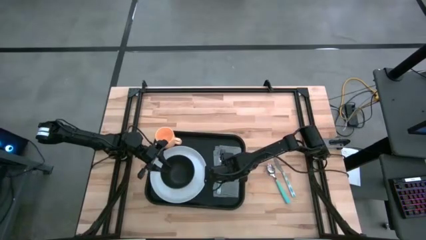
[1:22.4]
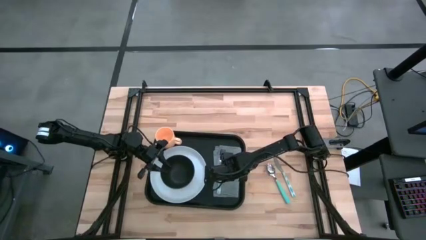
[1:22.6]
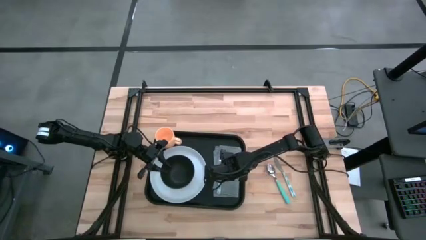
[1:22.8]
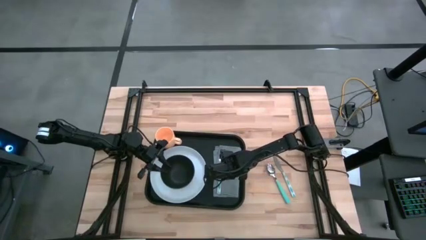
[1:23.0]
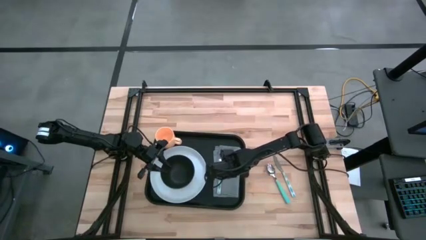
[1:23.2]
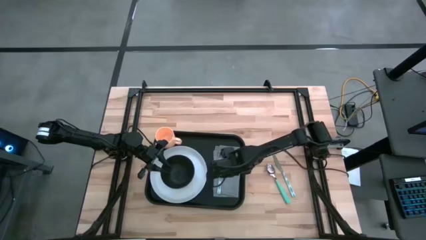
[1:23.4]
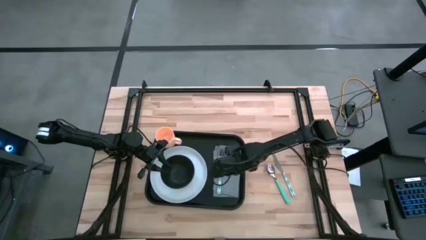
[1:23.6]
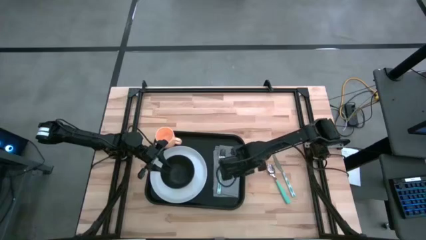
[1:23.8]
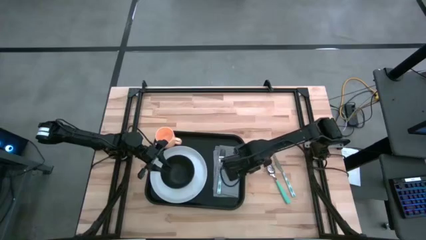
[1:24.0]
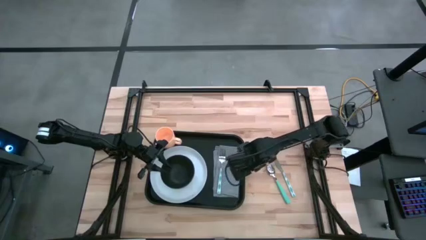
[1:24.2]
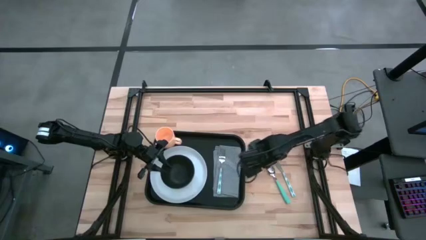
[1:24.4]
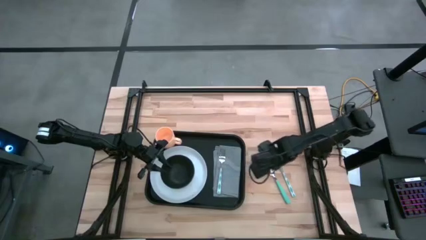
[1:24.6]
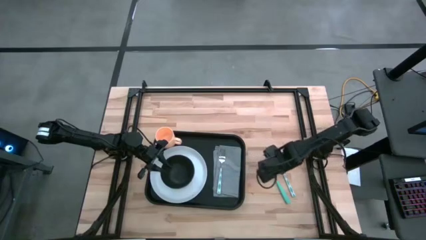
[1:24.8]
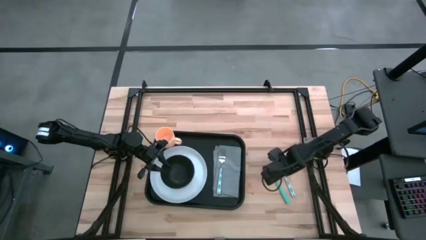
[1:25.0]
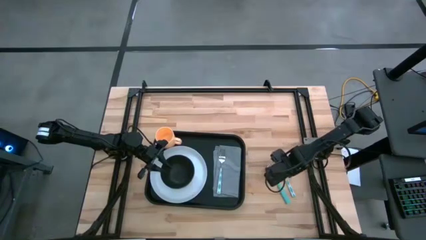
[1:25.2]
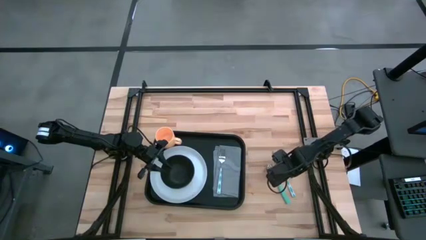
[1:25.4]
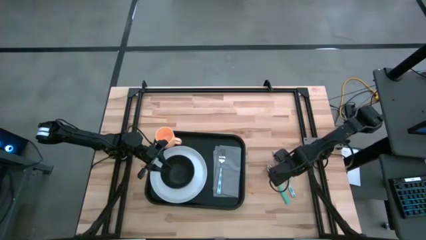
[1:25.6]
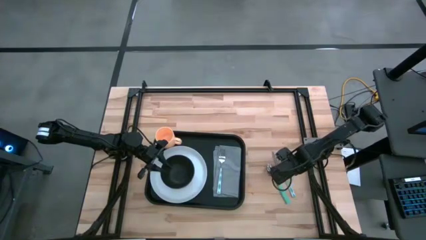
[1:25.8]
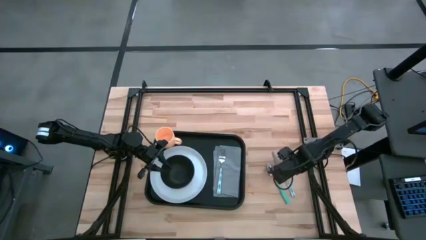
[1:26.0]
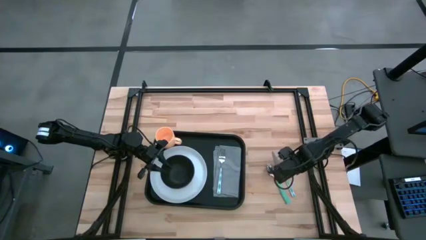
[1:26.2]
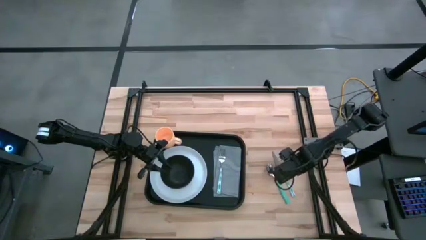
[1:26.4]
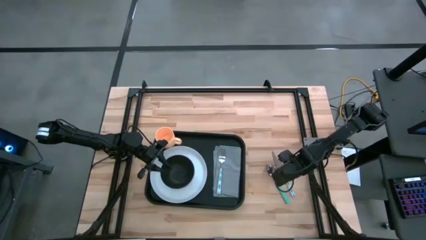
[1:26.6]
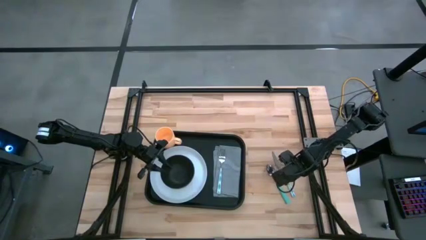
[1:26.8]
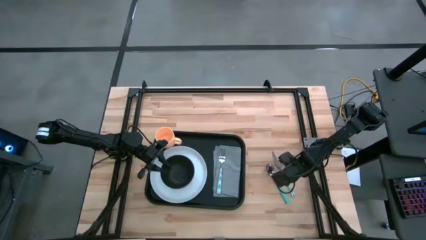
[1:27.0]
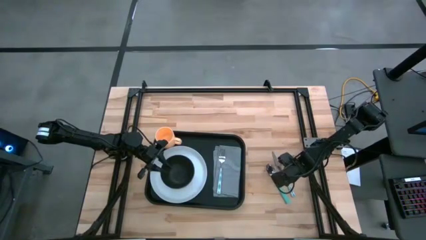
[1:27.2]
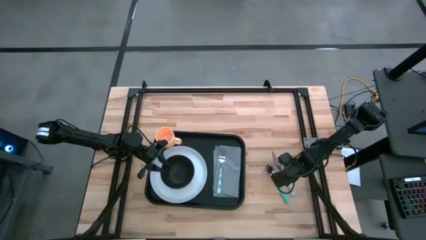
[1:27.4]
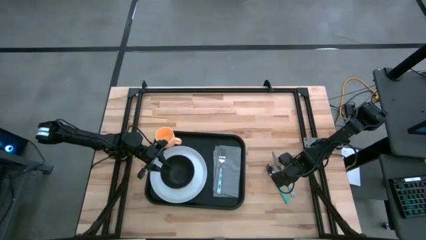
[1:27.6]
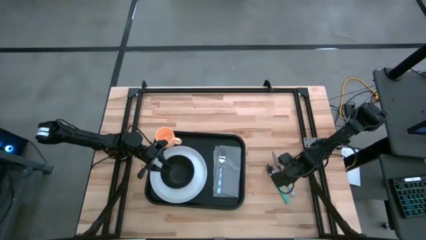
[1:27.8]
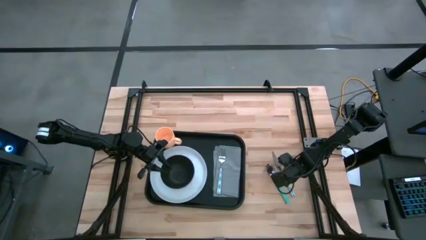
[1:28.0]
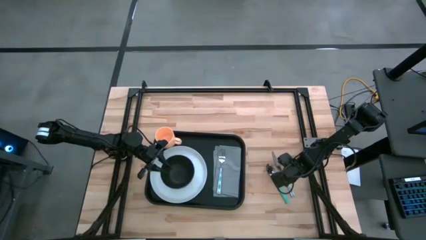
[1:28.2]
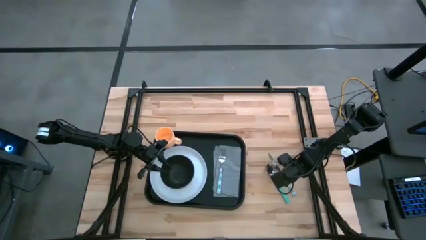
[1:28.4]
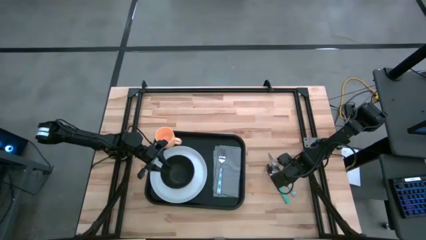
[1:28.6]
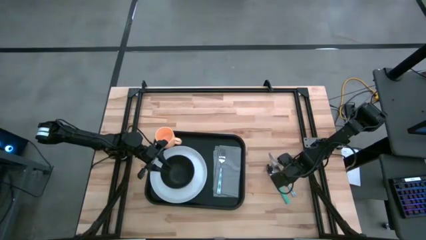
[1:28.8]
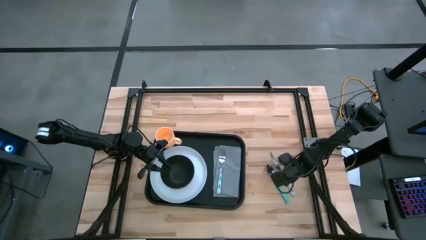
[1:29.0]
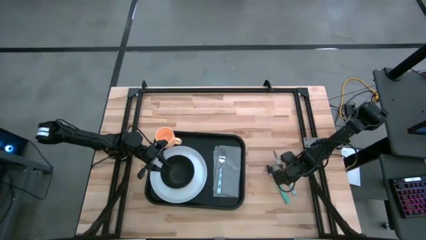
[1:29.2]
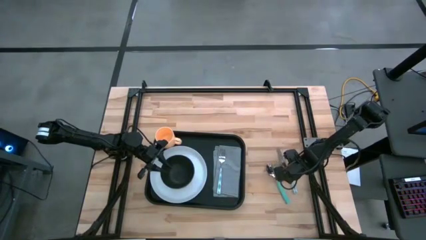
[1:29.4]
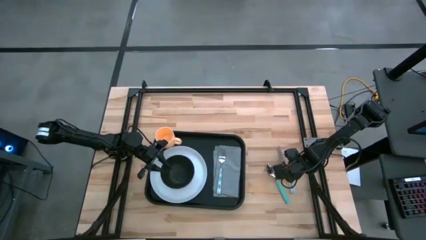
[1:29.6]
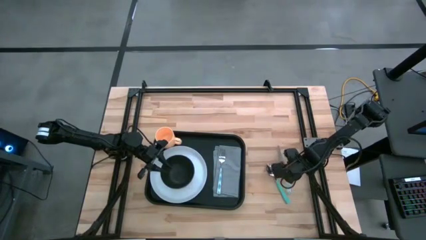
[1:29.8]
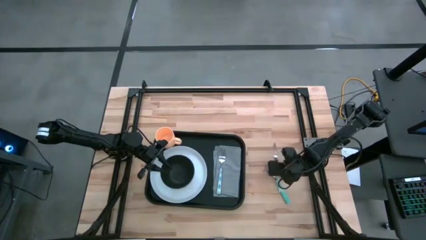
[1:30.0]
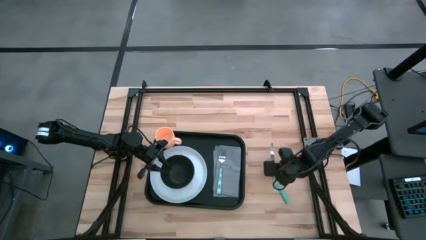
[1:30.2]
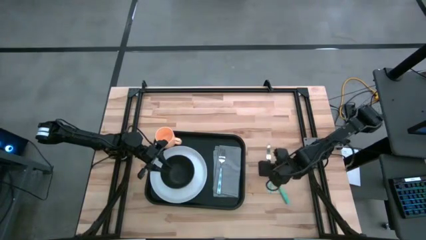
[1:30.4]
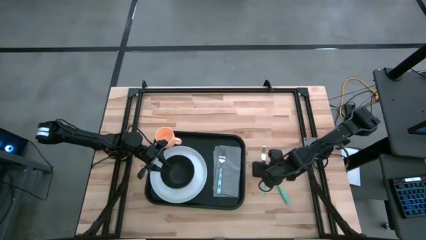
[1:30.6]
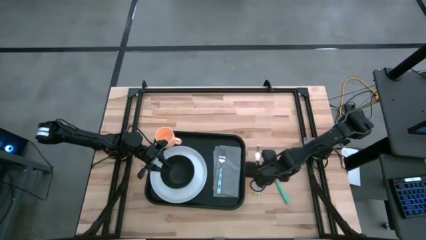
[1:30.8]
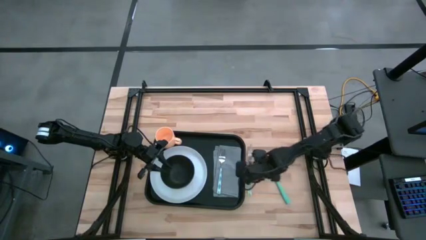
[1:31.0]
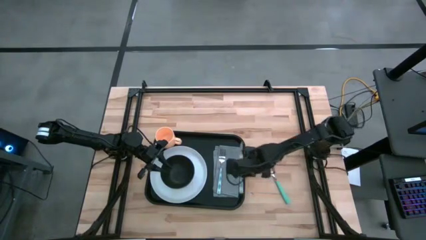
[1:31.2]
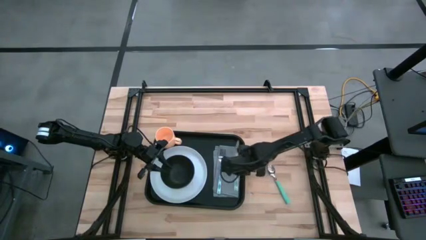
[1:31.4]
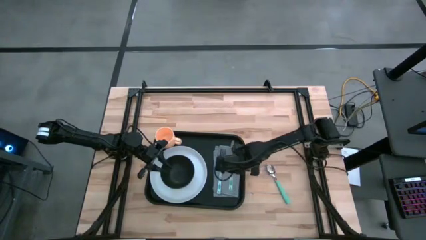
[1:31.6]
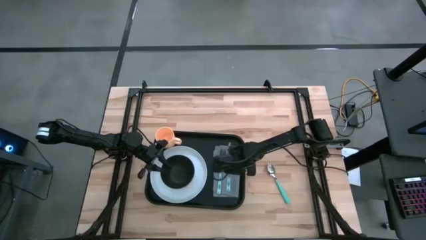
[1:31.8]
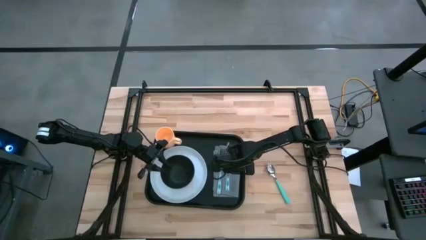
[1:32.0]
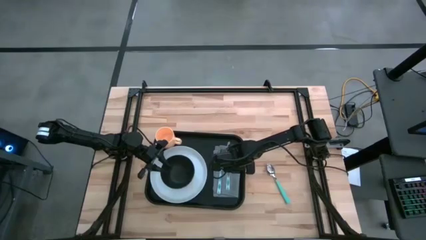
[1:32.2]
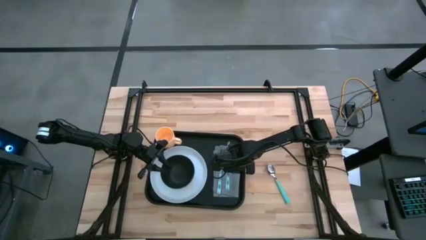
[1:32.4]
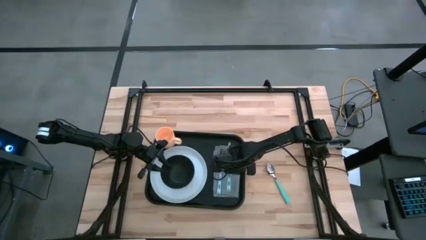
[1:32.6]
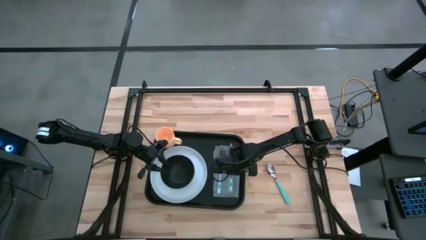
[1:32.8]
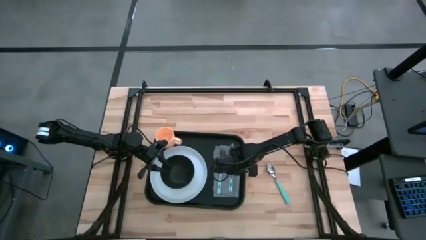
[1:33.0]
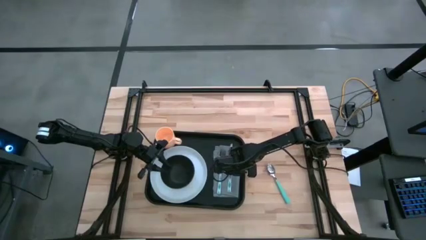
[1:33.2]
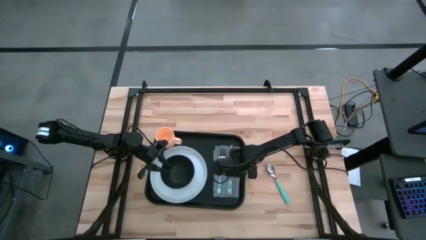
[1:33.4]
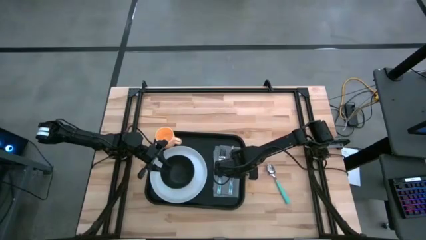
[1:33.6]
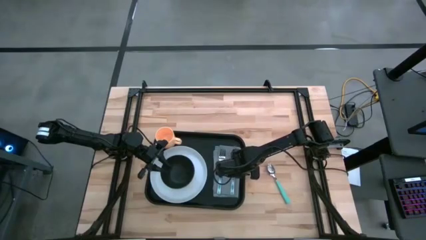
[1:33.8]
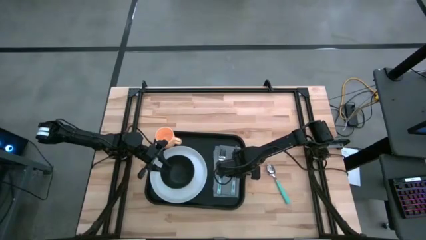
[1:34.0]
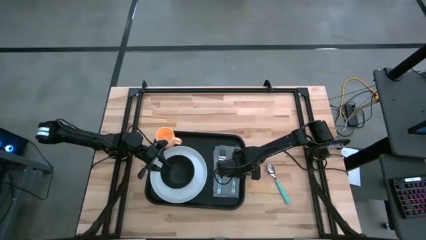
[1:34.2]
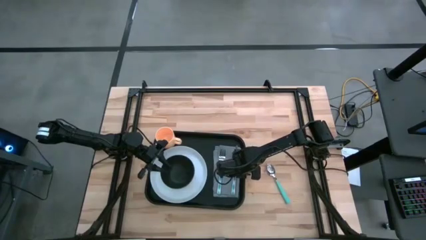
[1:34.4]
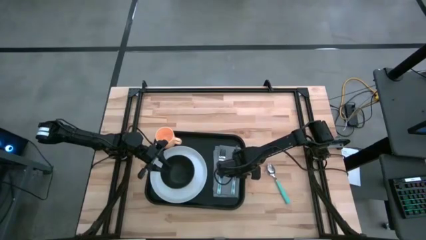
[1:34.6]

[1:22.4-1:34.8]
Task: Set up tray
Put the knife on the right side of the napkin on the serving tray
